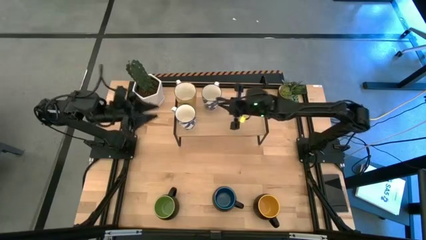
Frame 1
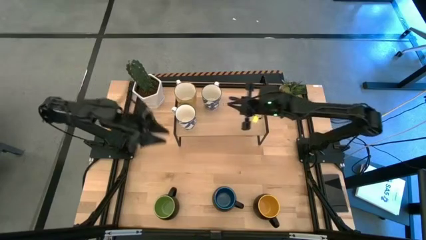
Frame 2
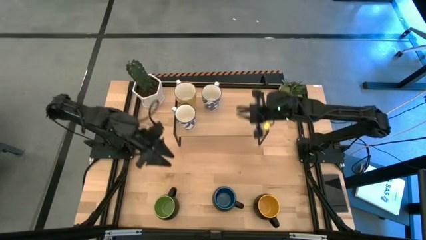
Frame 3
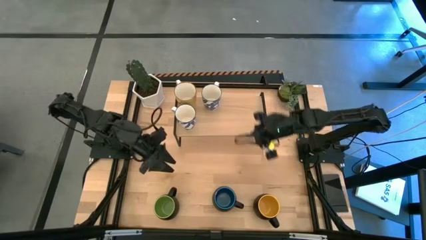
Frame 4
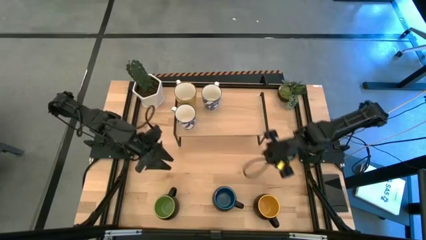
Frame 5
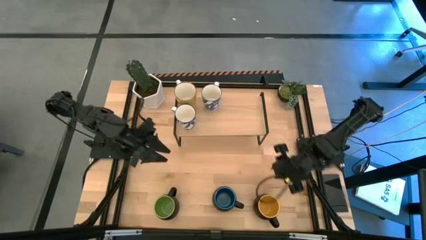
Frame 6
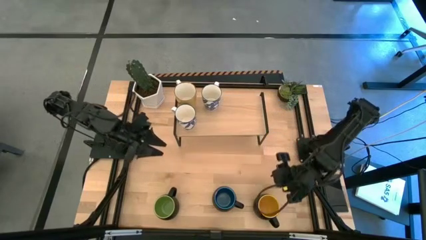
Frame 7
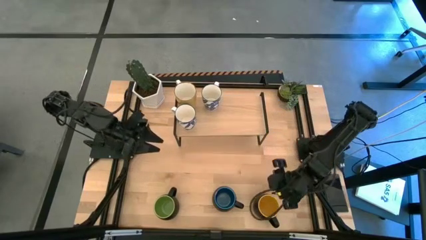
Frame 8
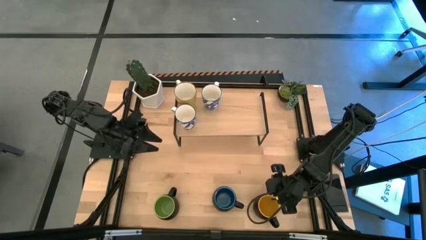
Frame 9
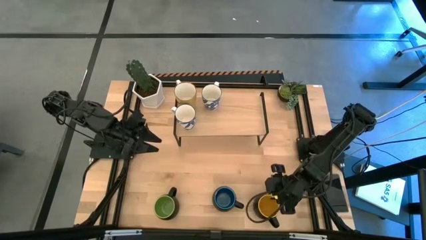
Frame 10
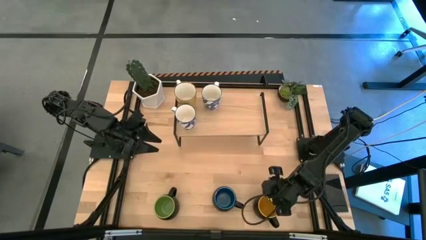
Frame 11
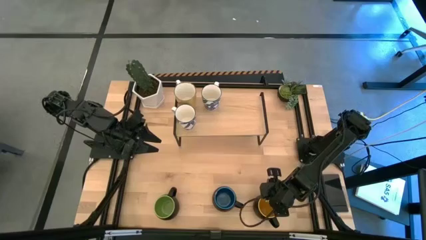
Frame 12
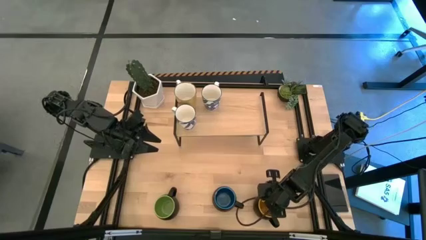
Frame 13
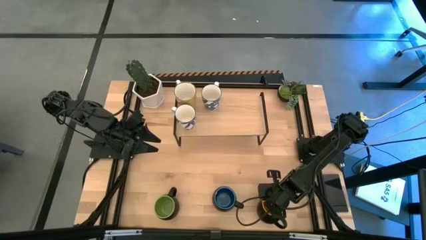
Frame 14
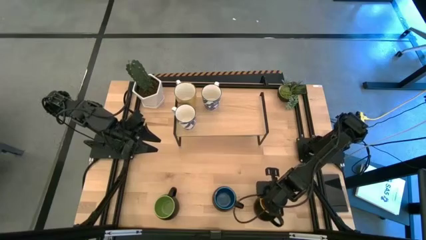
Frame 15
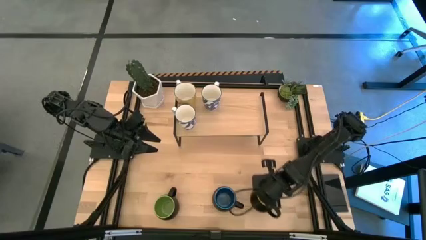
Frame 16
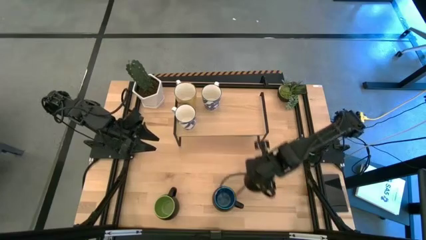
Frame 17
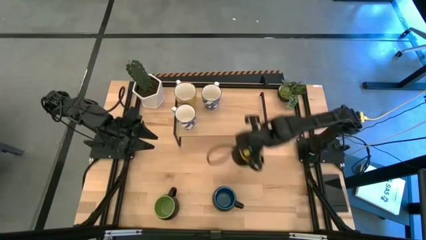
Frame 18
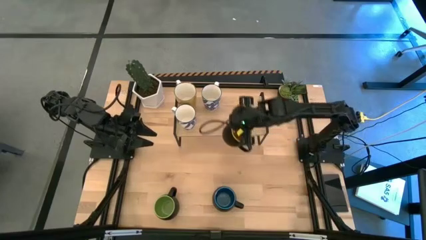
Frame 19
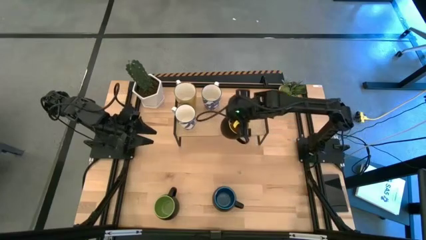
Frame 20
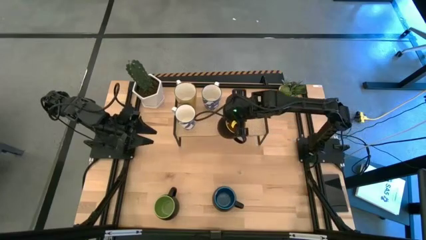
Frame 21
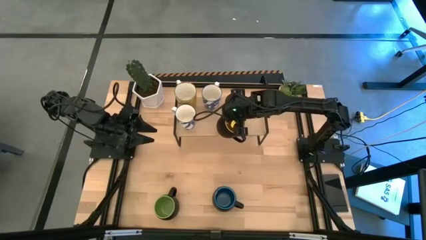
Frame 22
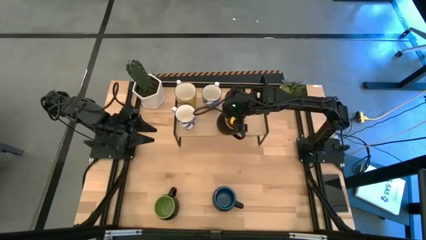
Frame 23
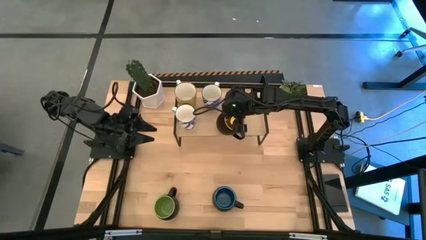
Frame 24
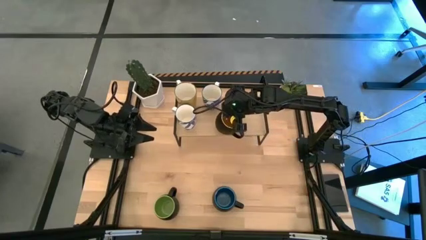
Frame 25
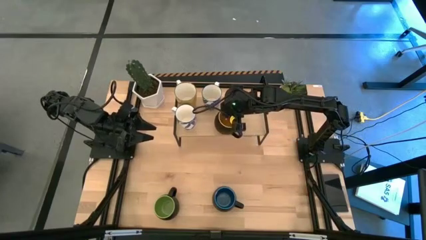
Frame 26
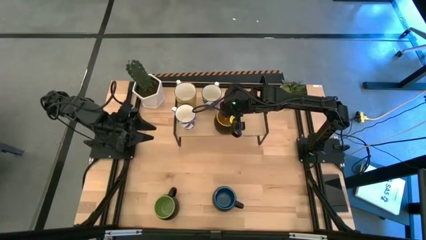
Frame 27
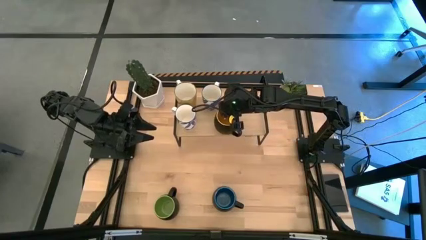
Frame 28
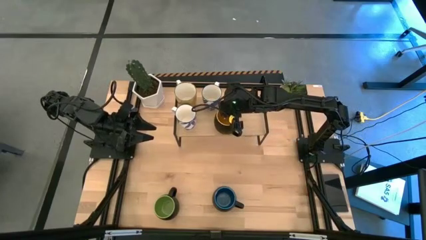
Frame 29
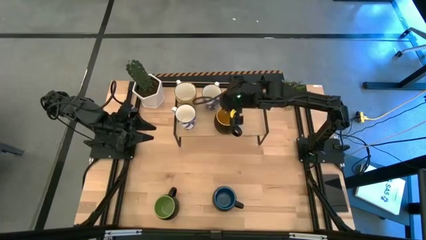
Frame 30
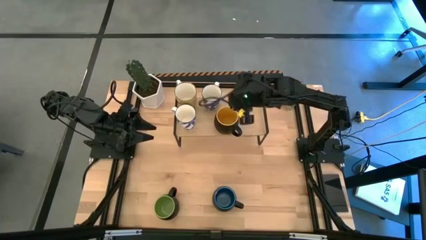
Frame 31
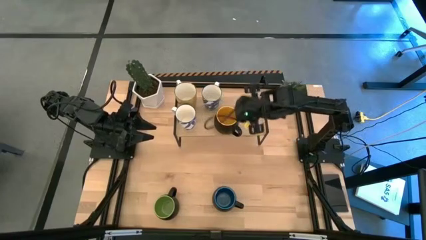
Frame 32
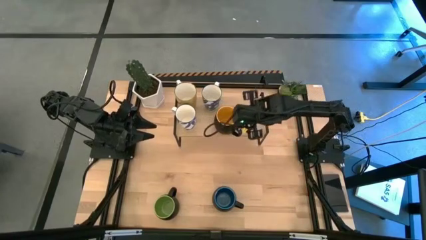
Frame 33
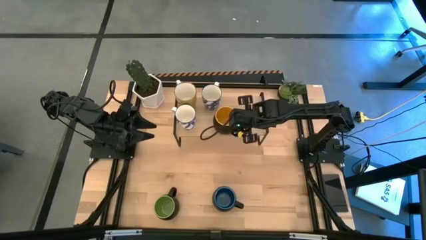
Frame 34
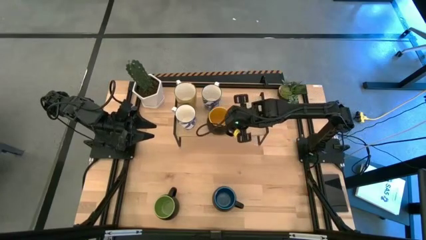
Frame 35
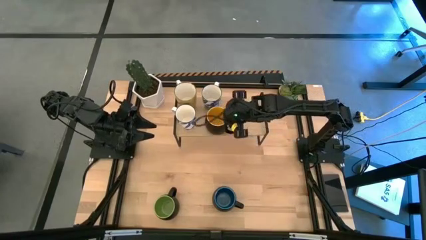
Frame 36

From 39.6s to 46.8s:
Task: Place coffee mugs
Put the black and yellow cup on the shelf aligned with the other white and blue patterned cup

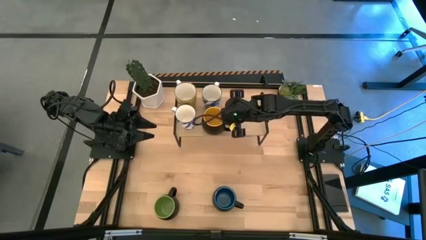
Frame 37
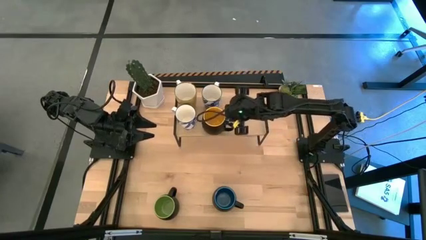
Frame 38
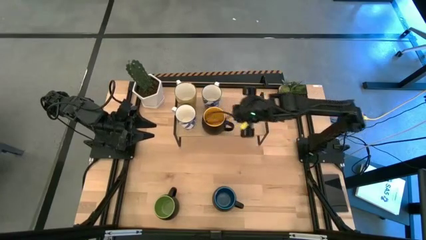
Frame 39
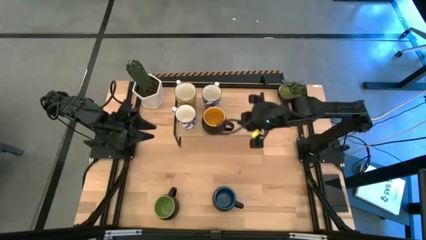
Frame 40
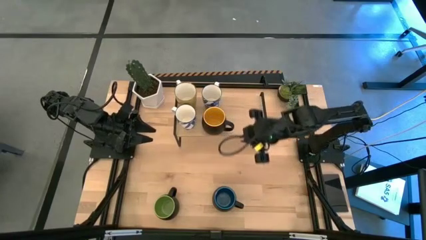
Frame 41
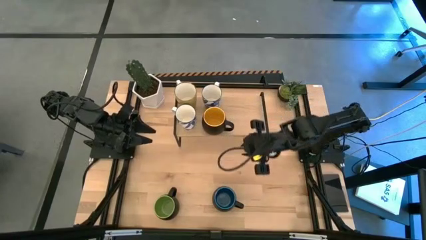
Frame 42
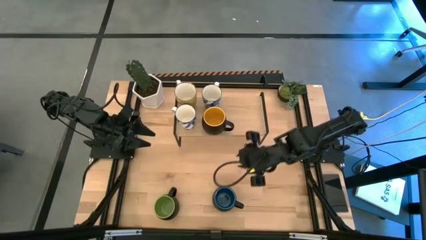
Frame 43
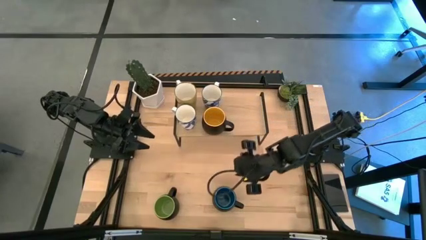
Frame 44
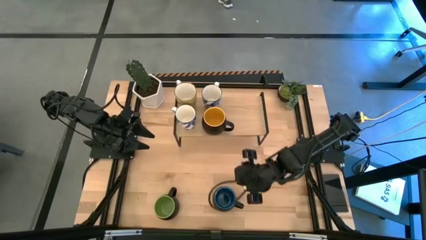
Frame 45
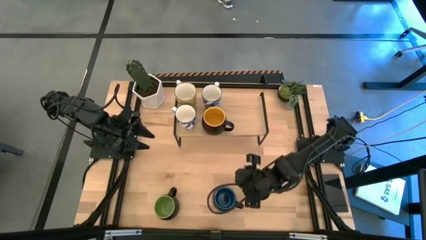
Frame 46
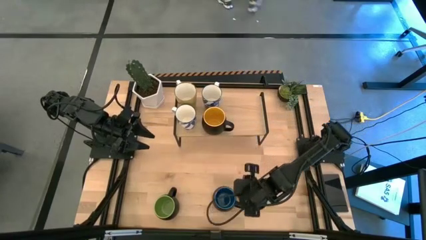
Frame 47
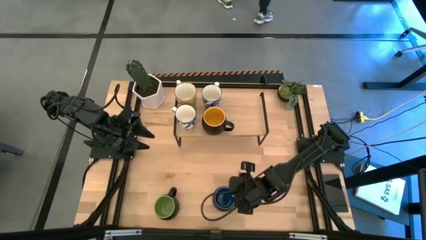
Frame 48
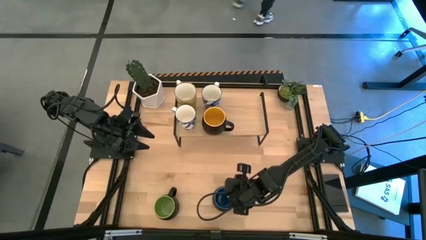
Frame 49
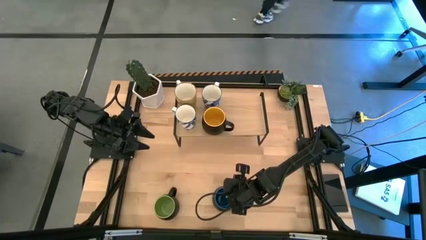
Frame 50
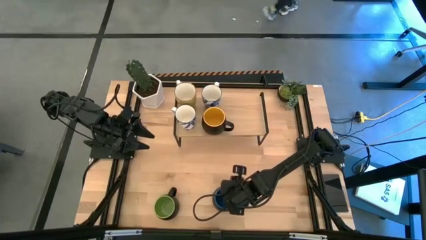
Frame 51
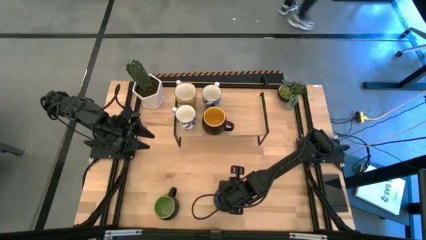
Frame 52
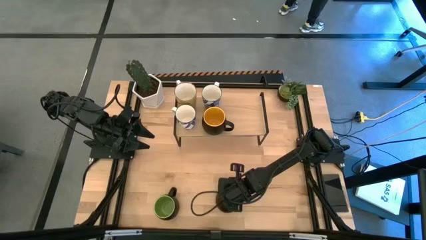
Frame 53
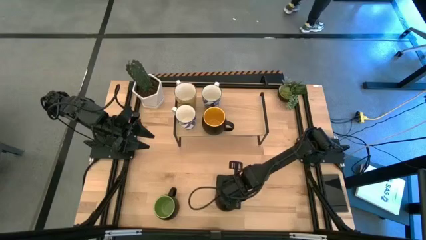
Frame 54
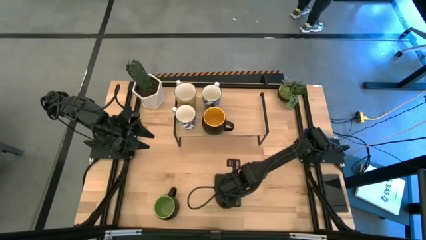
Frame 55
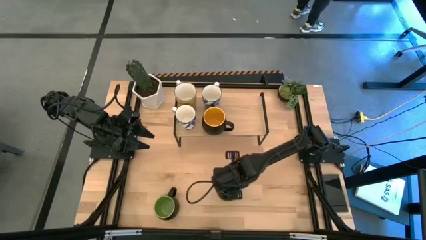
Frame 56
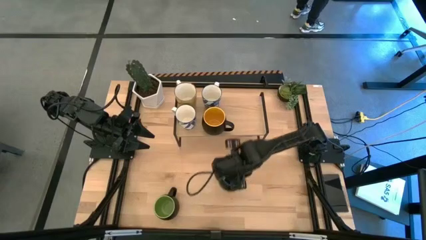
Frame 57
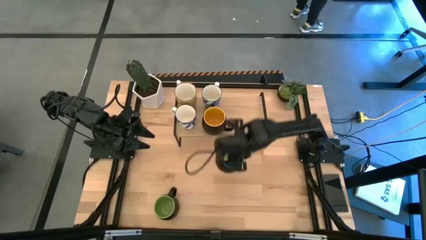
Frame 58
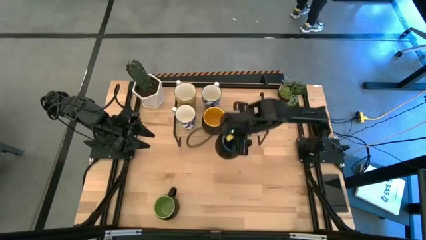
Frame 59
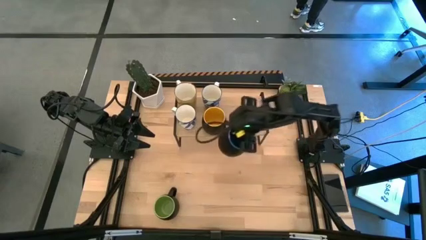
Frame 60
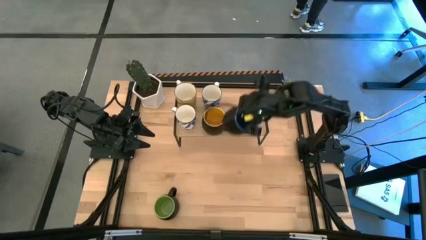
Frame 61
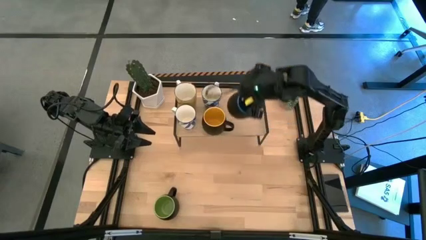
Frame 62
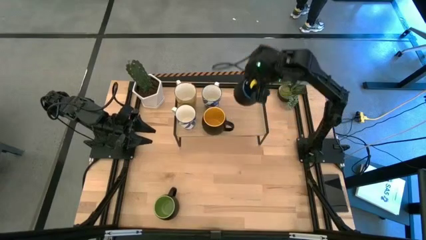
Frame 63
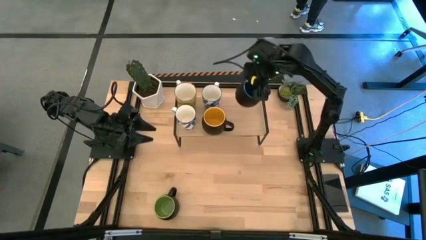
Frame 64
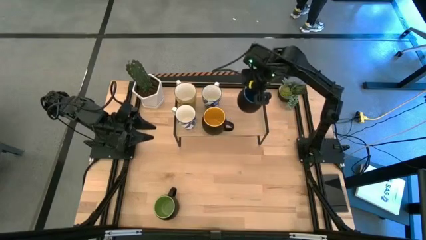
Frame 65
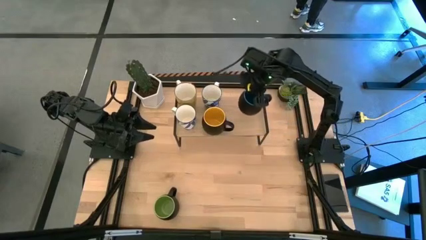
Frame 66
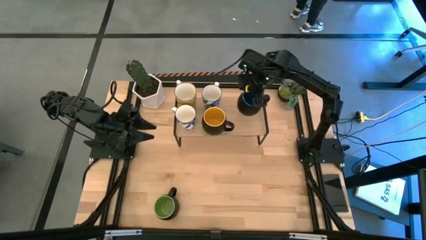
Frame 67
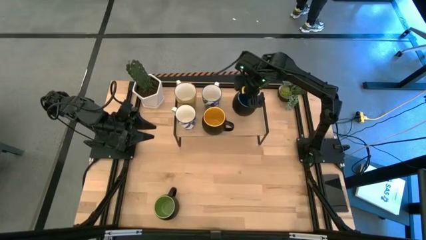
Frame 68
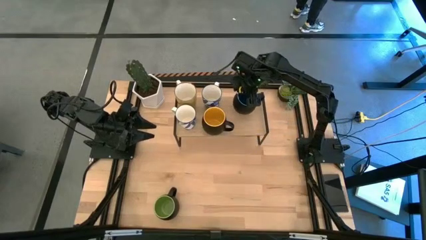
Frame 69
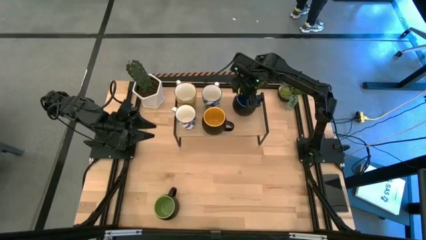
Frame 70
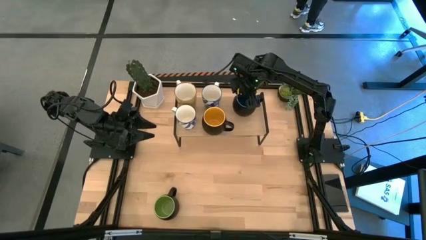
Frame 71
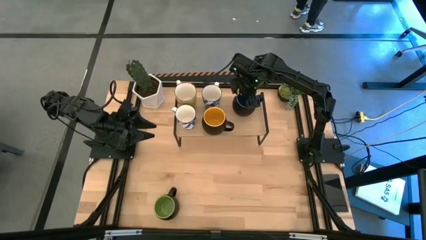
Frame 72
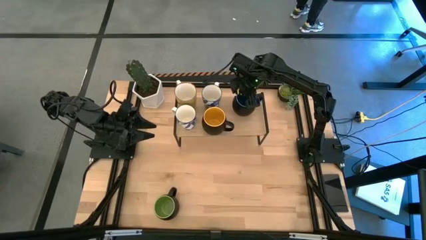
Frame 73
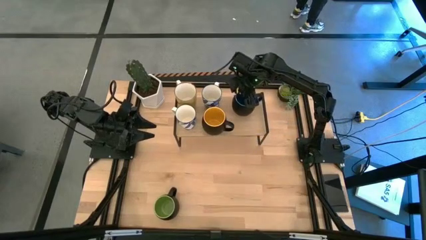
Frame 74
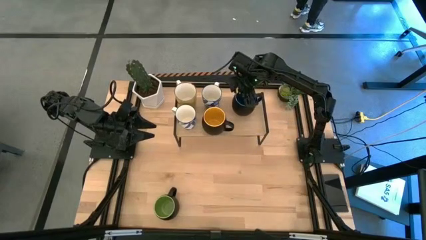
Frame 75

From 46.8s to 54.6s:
Put the black and blue cup on the shelf

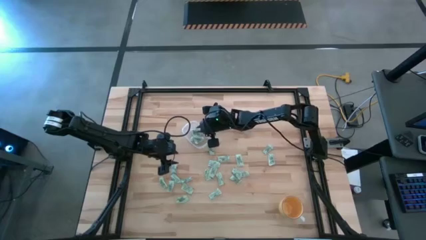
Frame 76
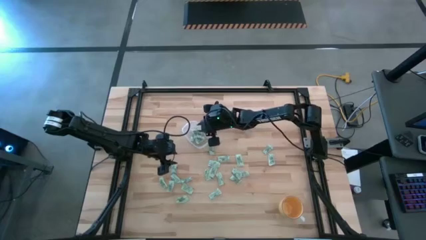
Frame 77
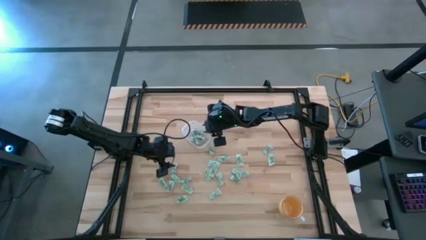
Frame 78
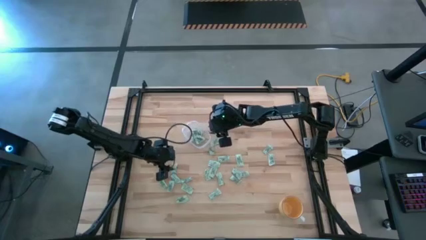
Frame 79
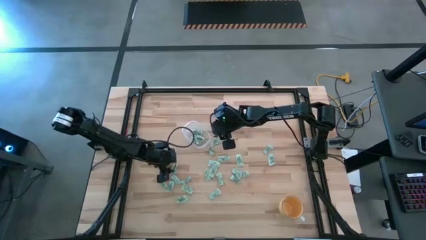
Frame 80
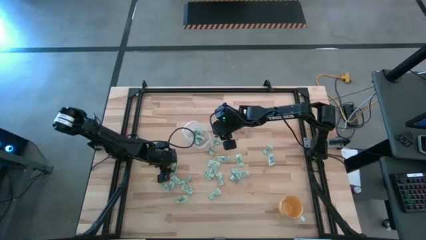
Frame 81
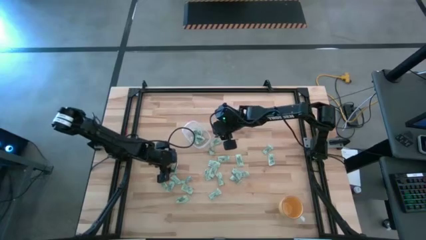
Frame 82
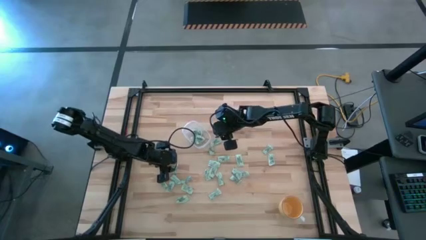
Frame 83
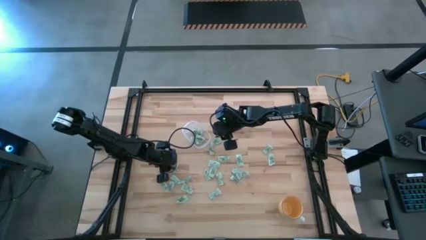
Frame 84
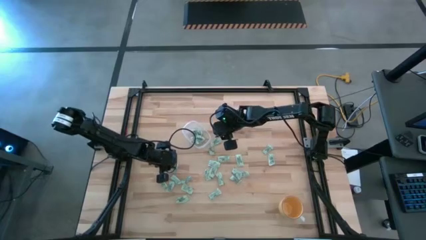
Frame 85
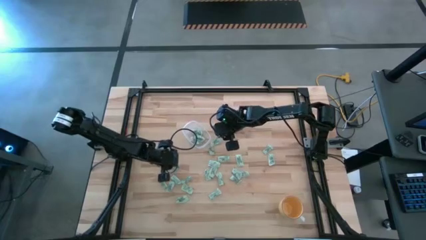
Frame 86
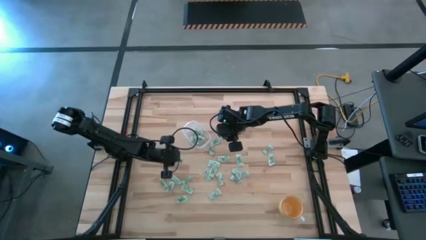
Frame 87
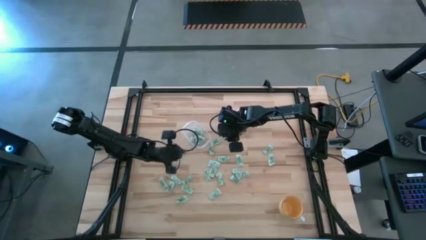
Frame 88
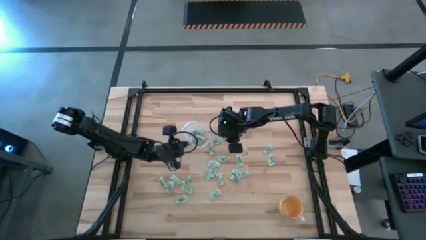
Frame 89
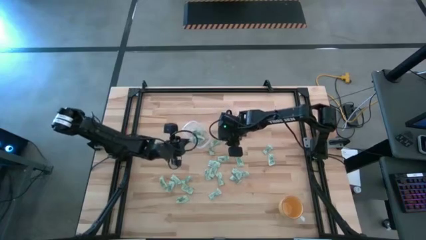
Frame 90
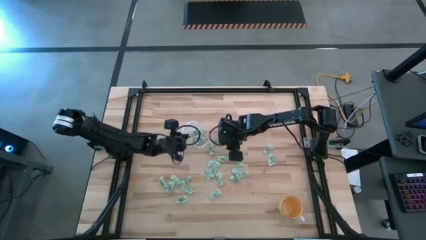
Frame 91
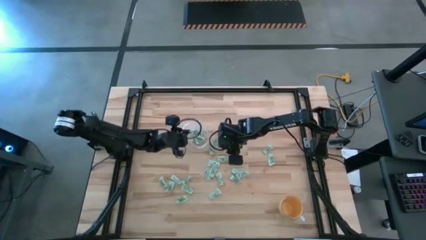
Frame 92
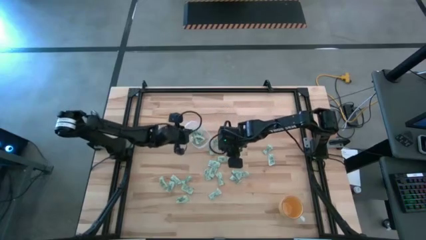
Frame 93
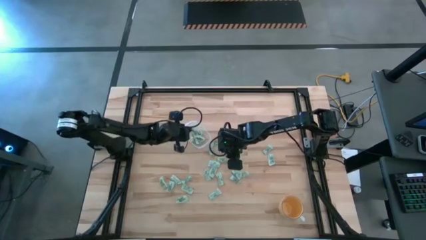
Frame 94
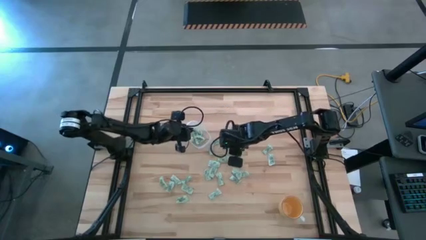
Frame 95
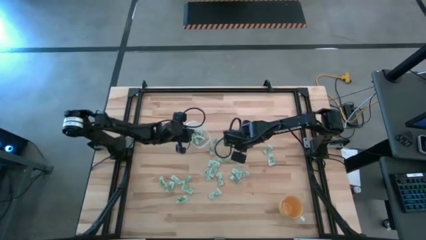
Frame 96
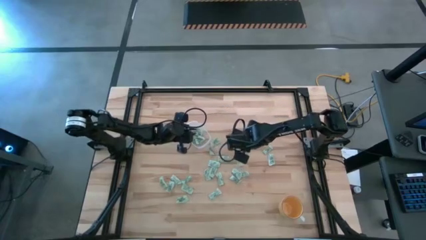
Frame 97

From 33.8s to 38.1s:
Task: Pick and place Stevia / Truvia into bins
Put the stevia packet into the transparent bin
